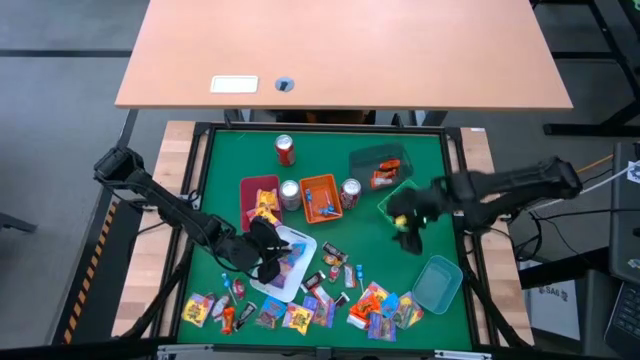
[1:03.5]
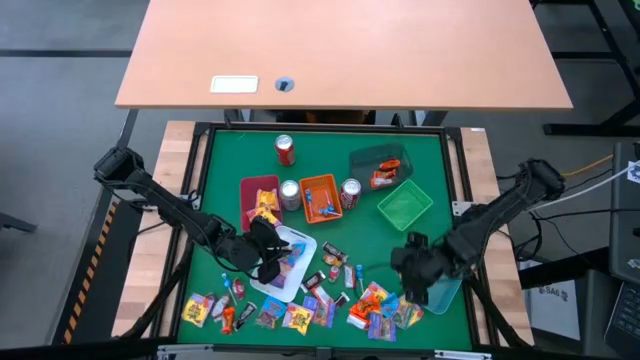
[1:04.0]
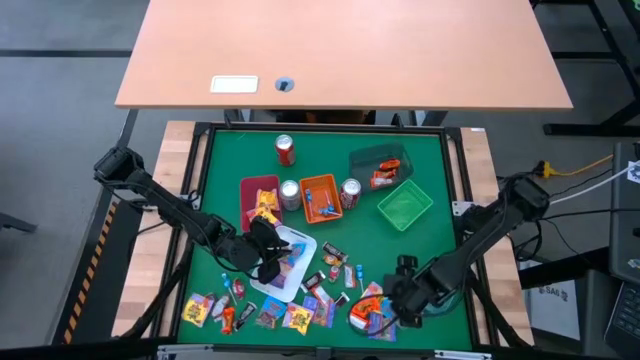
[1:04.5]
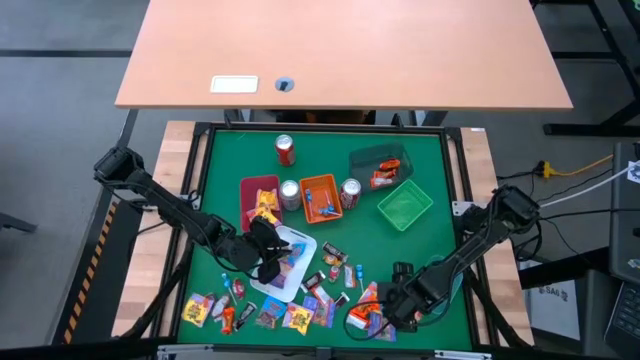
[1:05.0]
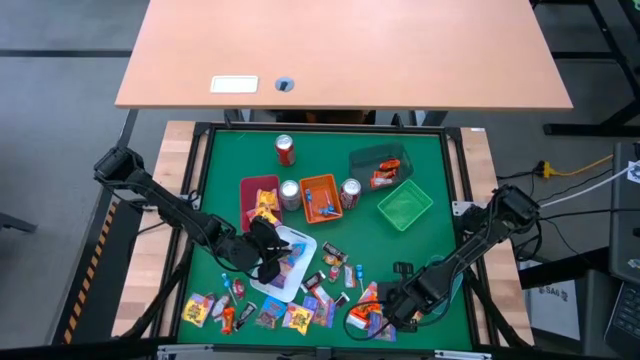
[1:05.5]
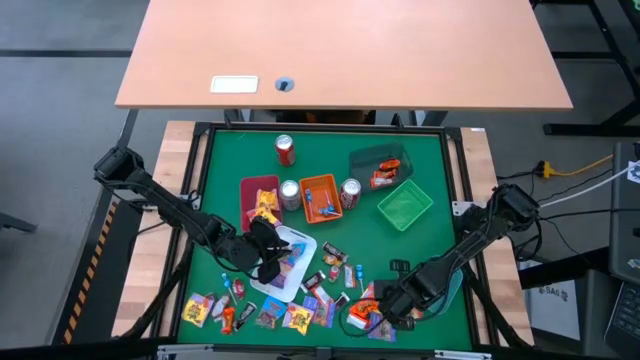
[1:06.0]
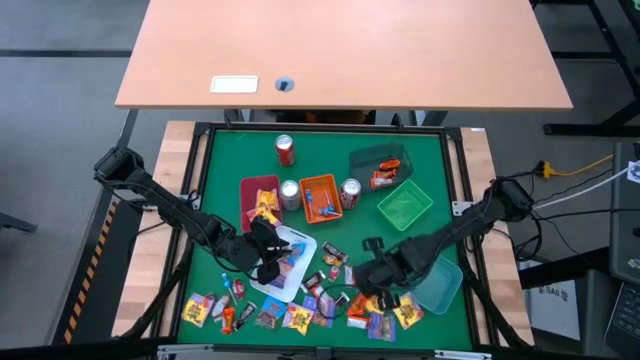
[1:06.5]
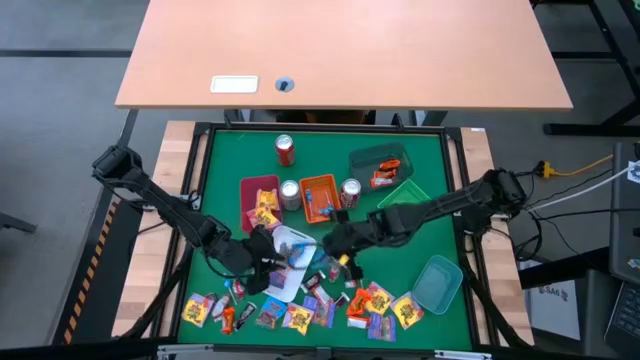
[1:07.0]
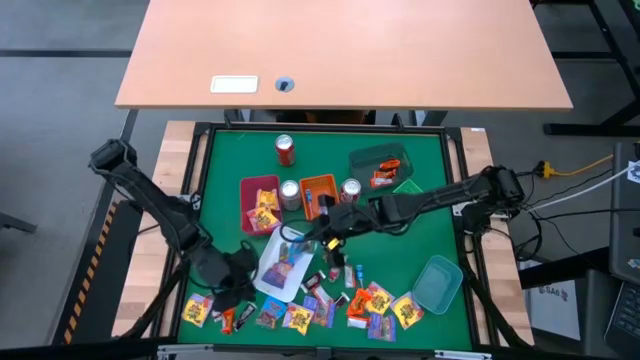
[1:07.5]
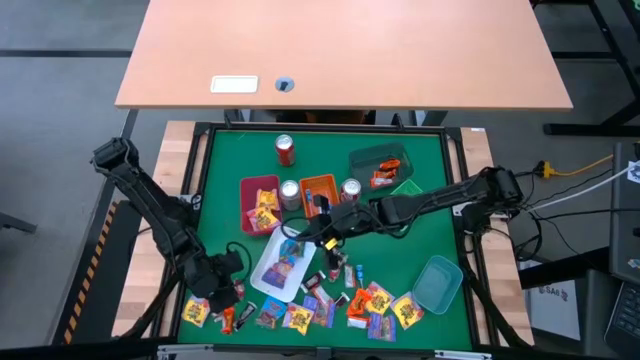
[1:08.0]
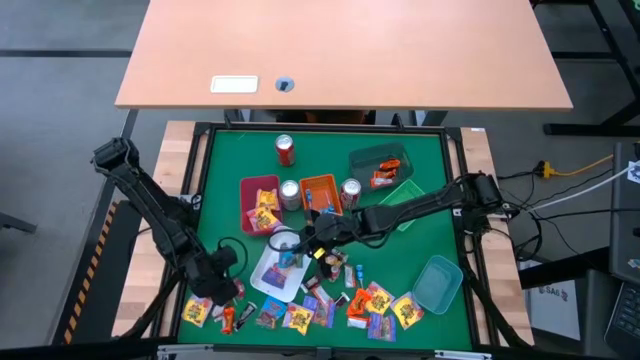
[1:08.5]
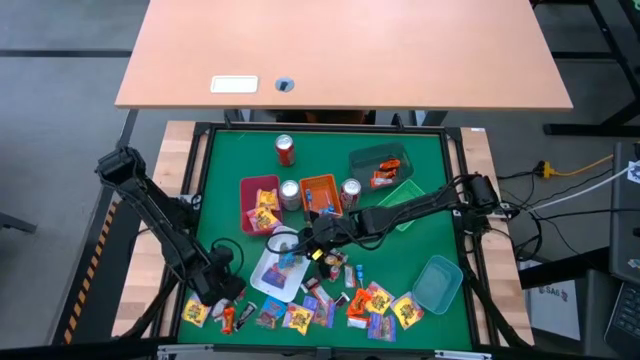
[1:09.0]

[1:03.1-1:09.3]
Task: Sort candy
Put the blue gummy into the white bin

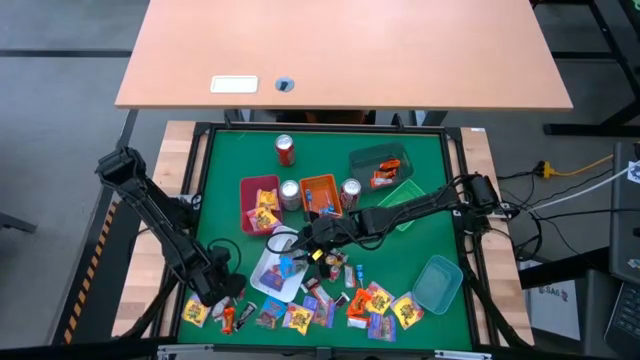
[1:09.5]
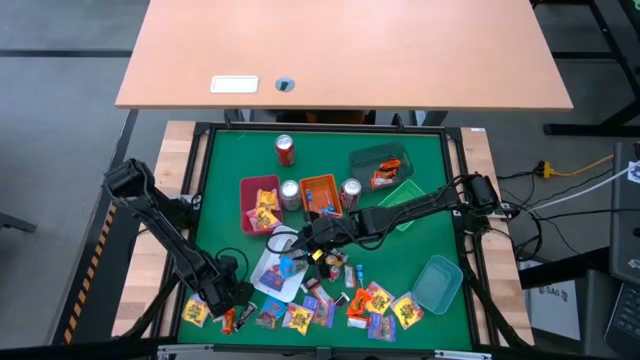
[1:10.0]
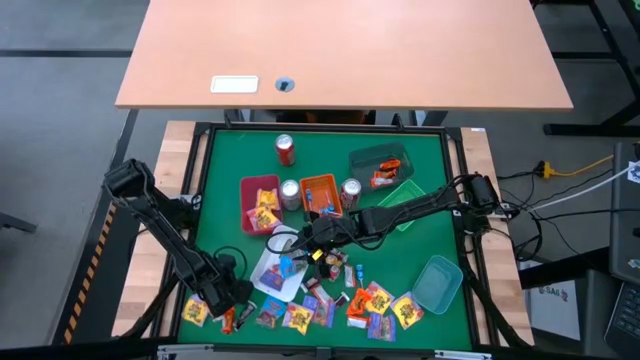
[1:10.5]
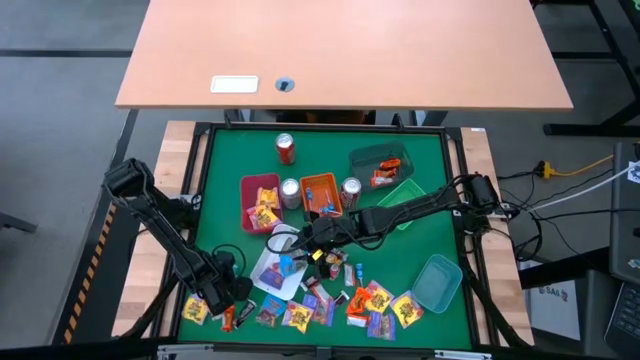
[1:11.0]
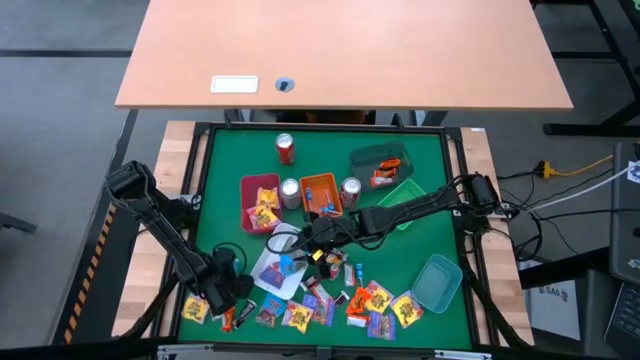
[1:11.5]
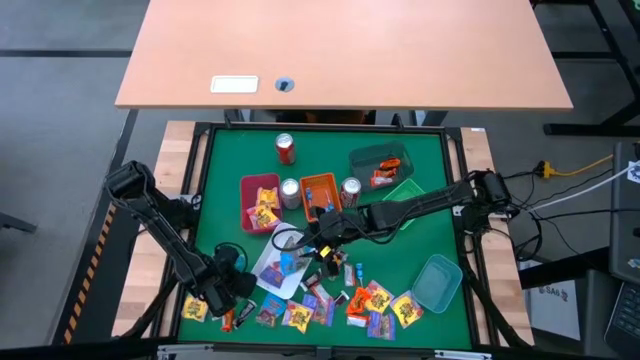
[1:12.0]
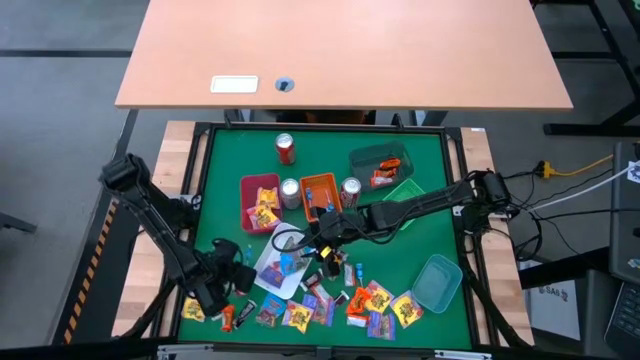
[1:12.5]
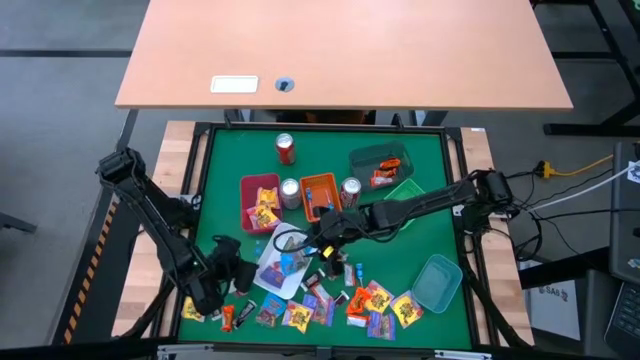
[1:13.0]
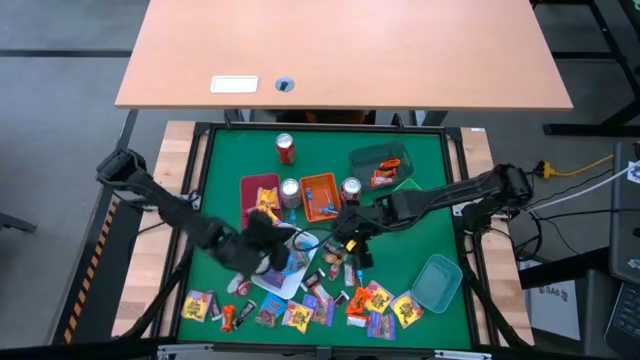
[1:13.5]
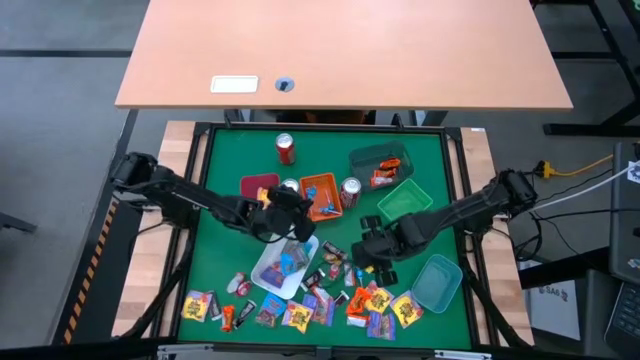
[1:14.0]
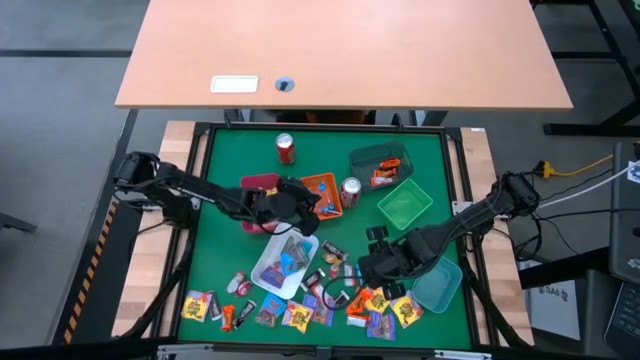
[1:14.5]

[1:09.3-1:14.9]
Put the blue lollipop into the orange bin

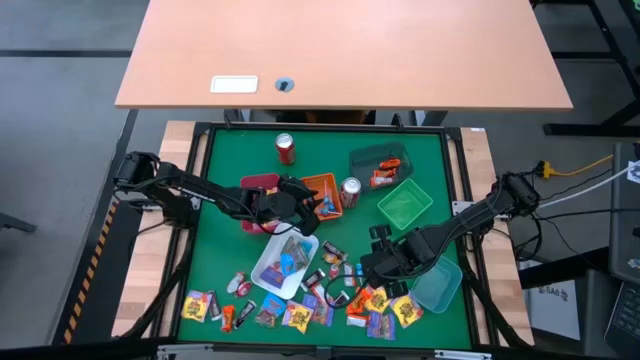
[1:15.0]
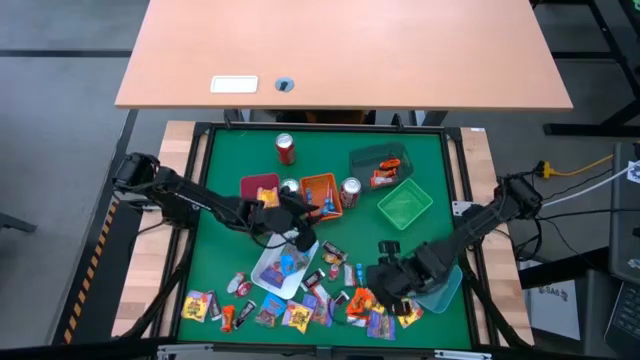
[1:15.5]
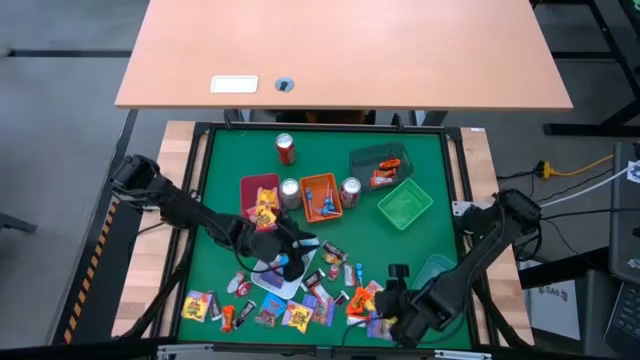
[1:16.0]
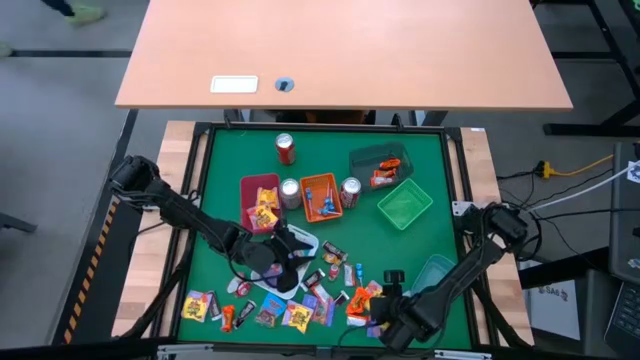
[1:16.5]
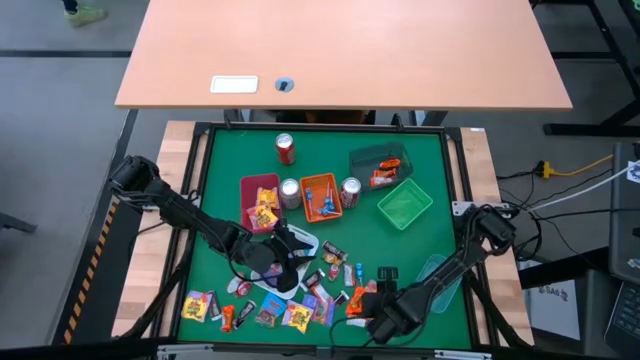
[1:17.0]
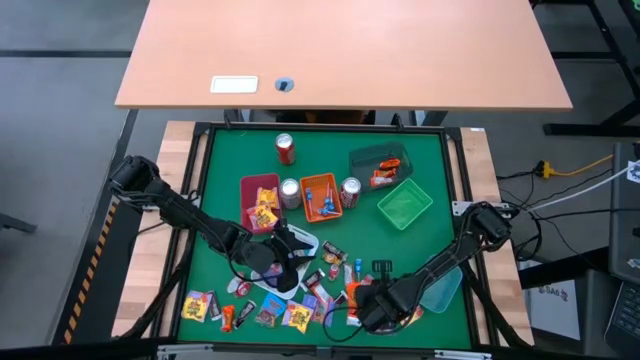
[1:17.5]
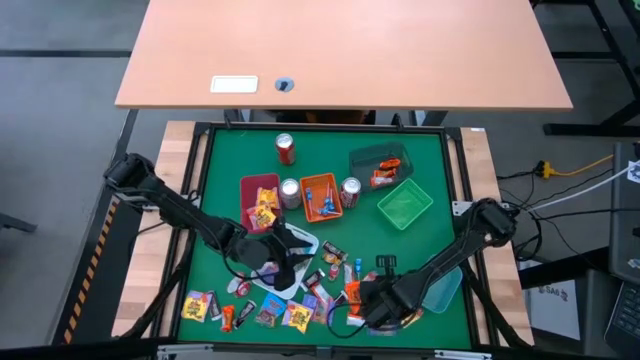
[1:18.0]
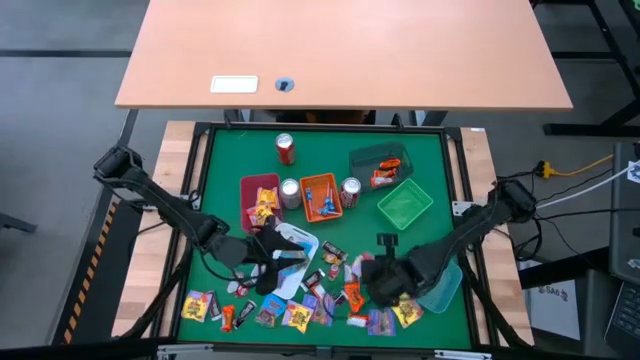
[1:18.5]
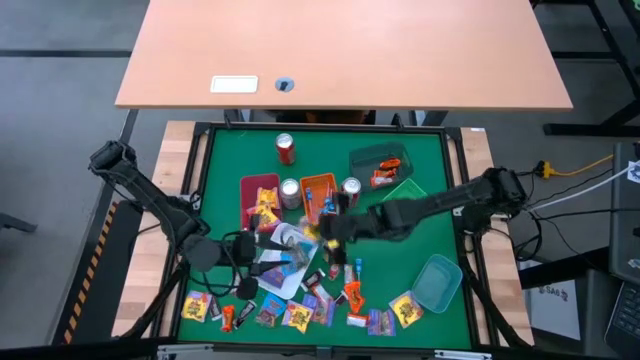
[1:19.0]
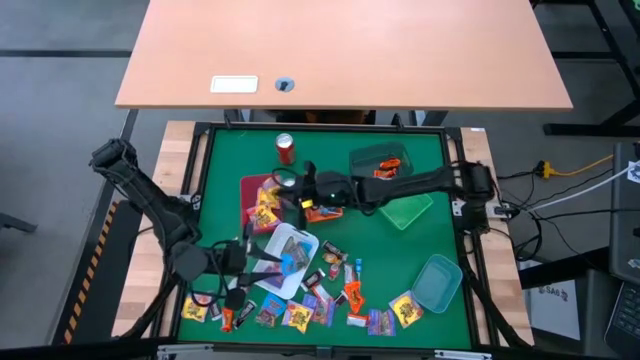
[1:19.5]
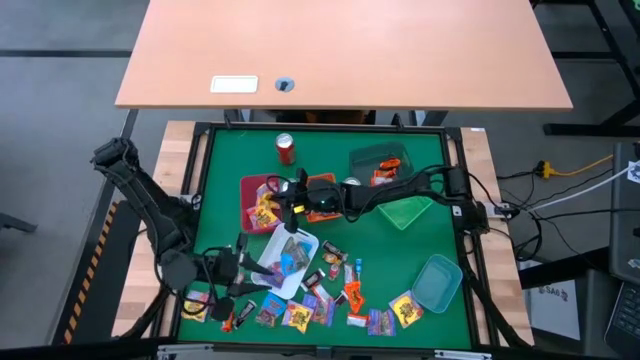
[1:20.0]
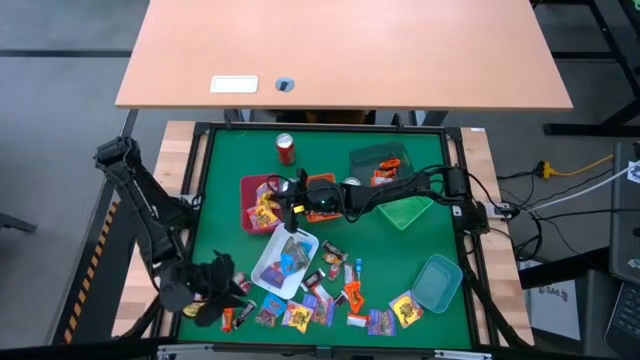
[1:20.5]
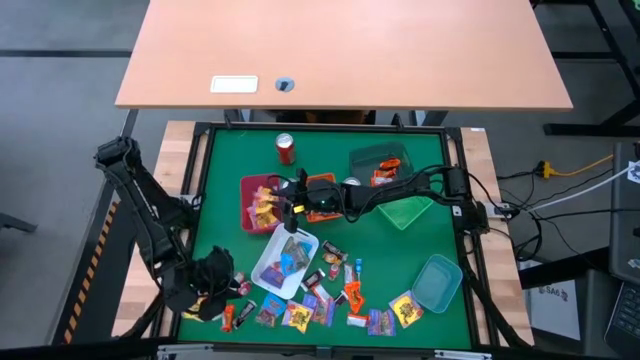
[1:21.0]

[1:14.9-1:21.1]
Put the yellow candy into the red bin

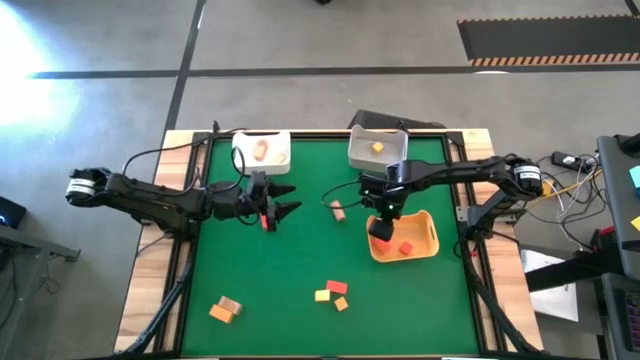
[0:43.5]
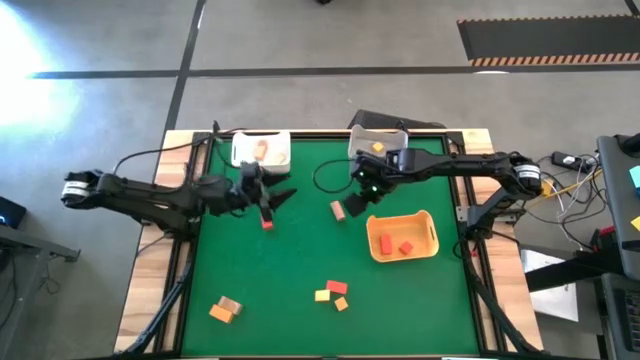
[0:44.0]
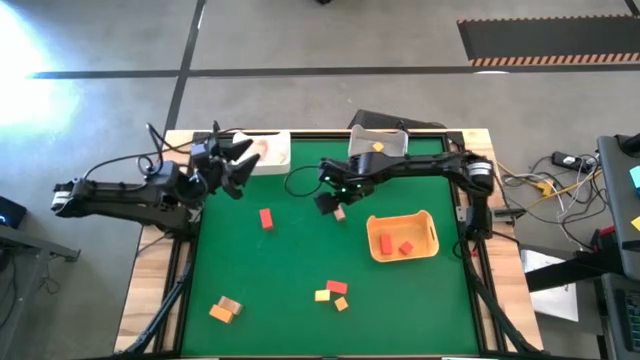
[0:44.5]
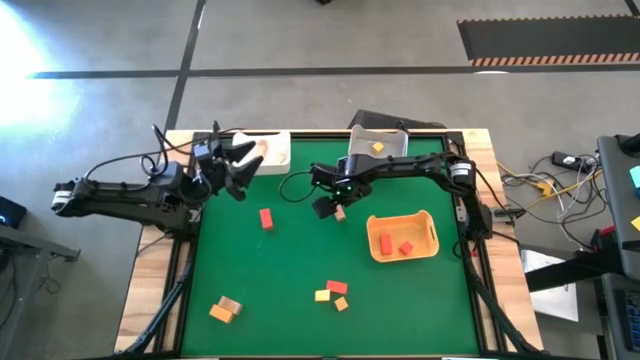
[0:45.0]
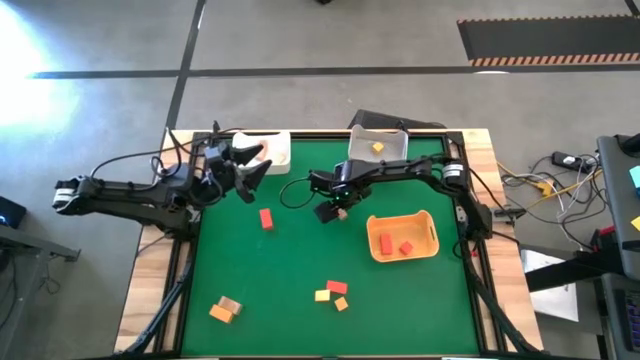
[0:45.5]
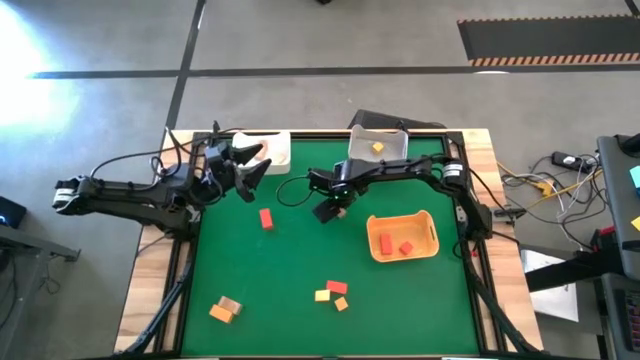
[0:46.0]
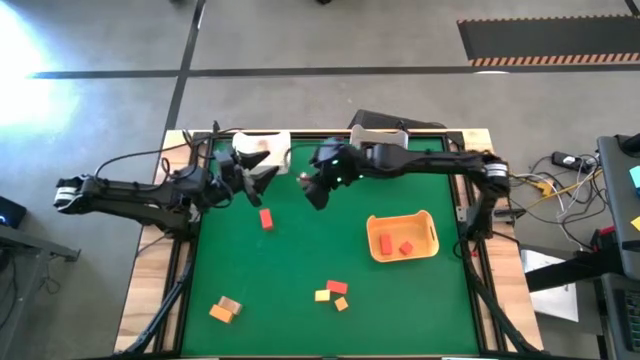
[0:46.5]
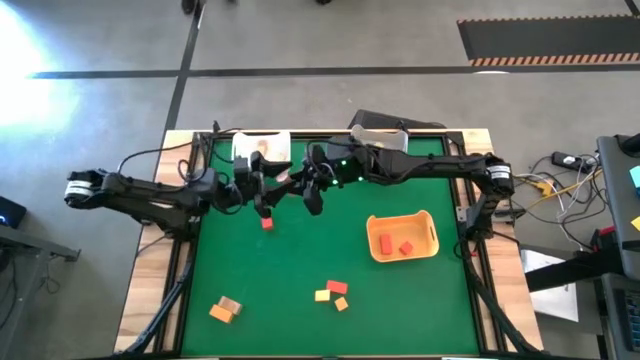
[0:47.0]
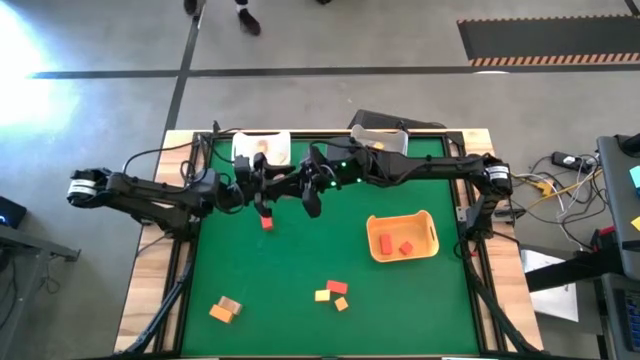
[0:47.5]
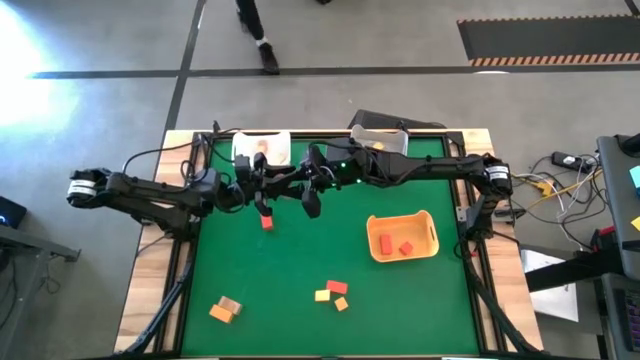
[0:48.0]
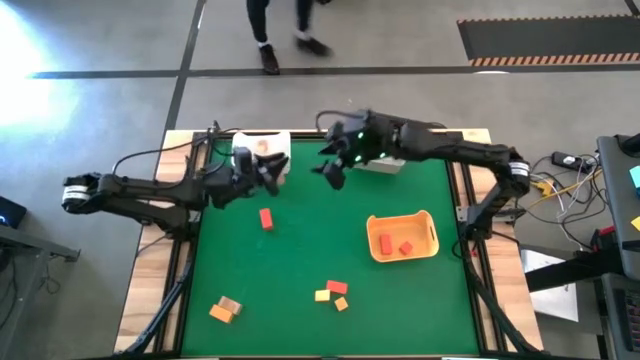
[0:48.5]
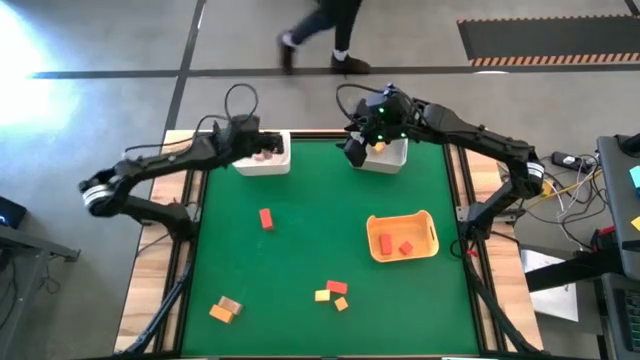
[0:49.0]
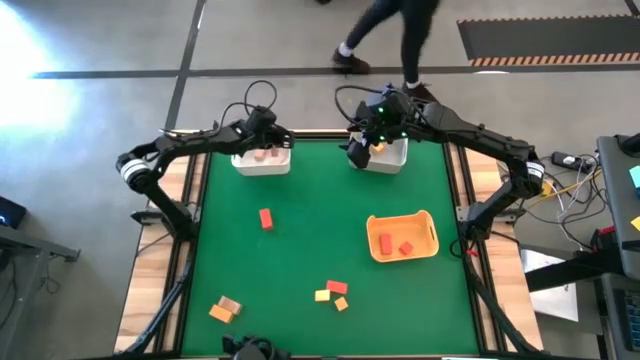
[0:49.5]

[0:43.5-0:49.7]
Task: Sort & place blocks by color
Put the brown block into the white bin
